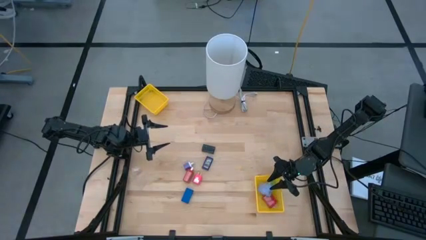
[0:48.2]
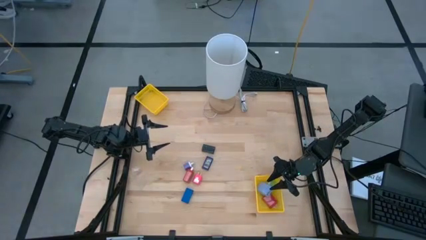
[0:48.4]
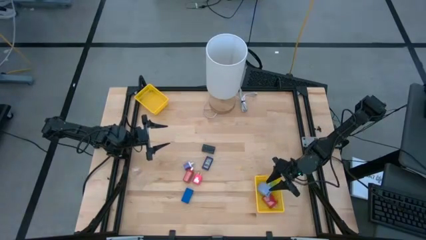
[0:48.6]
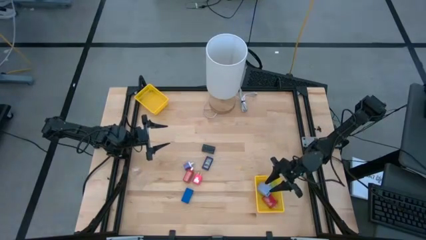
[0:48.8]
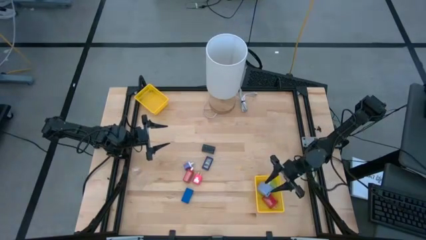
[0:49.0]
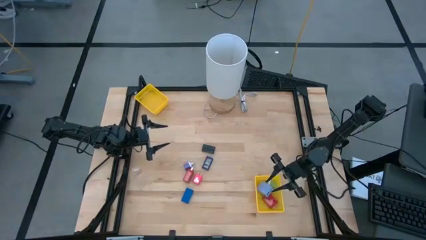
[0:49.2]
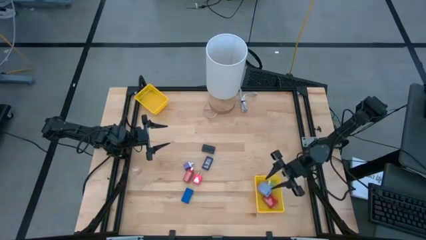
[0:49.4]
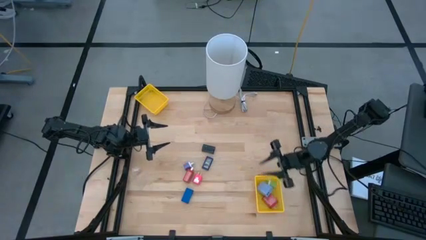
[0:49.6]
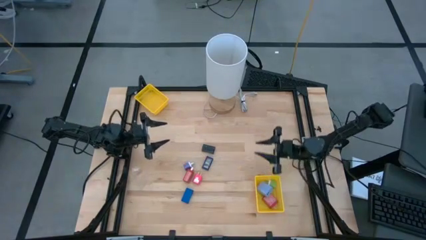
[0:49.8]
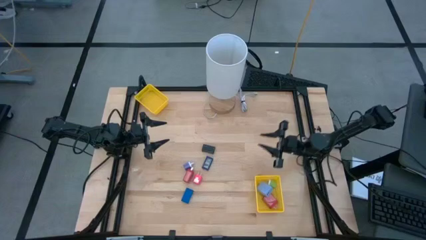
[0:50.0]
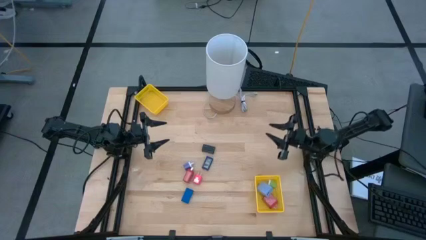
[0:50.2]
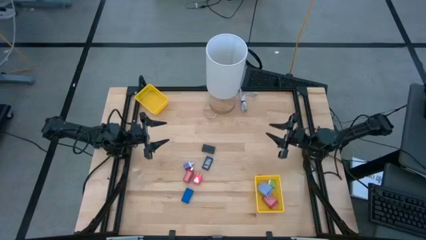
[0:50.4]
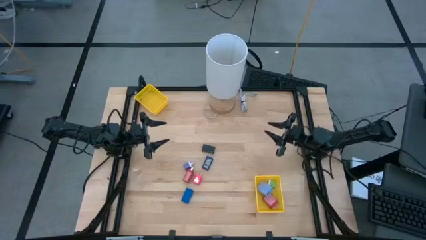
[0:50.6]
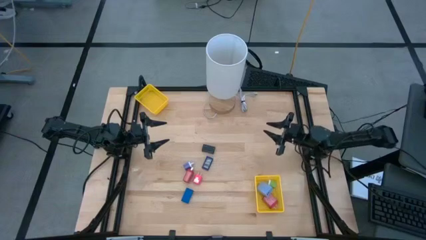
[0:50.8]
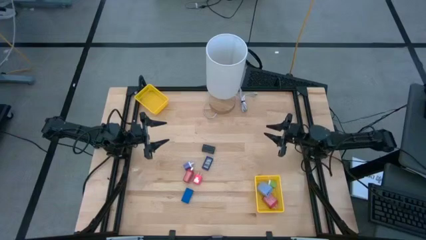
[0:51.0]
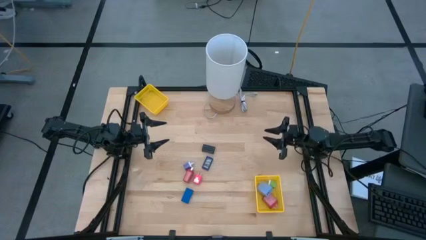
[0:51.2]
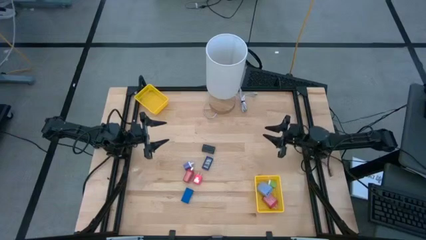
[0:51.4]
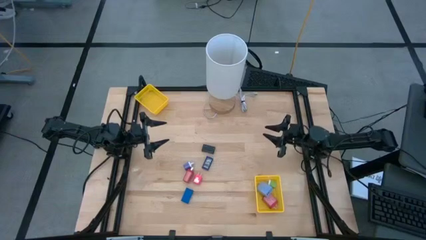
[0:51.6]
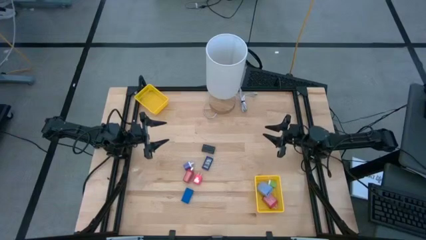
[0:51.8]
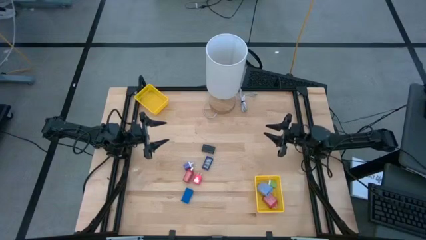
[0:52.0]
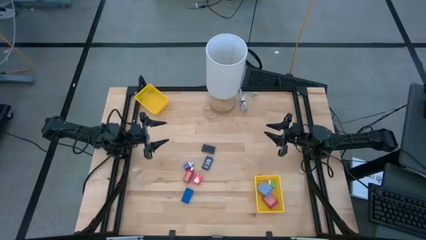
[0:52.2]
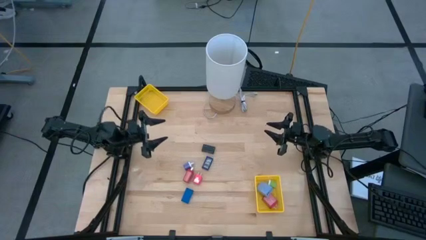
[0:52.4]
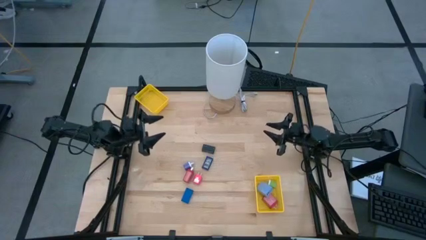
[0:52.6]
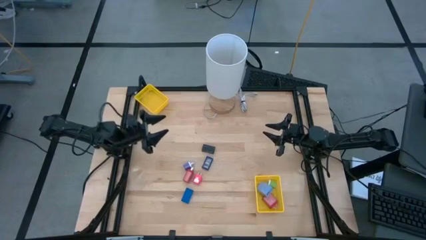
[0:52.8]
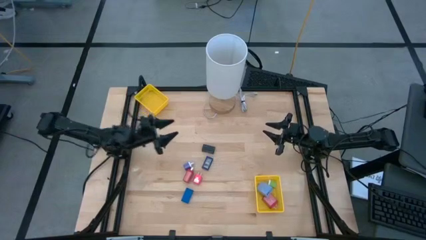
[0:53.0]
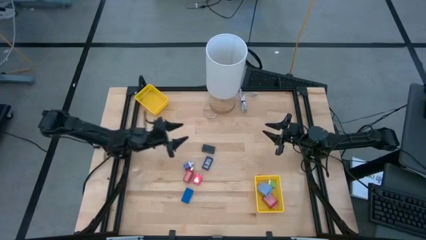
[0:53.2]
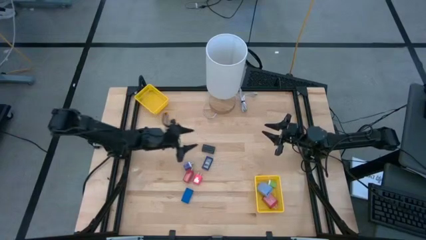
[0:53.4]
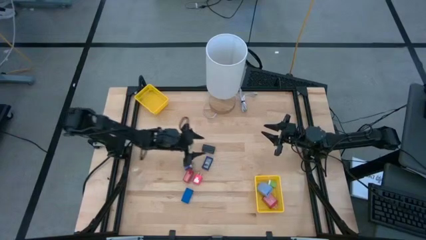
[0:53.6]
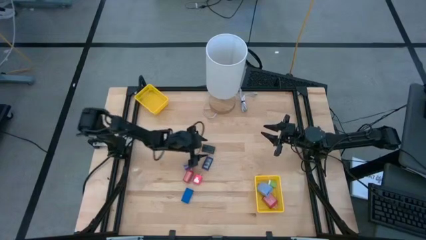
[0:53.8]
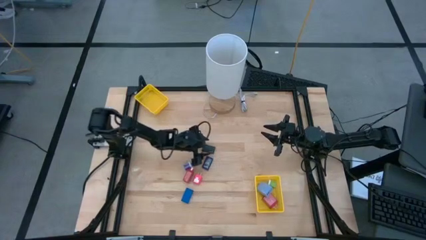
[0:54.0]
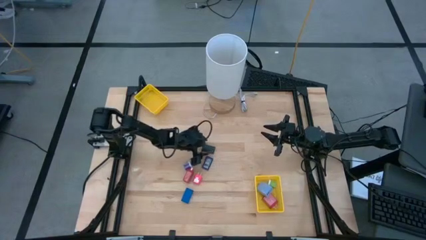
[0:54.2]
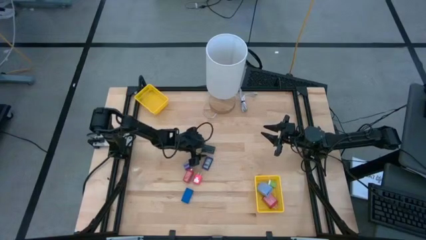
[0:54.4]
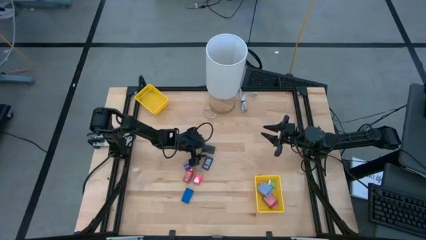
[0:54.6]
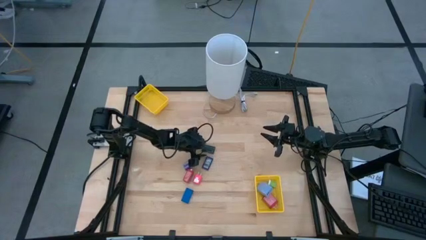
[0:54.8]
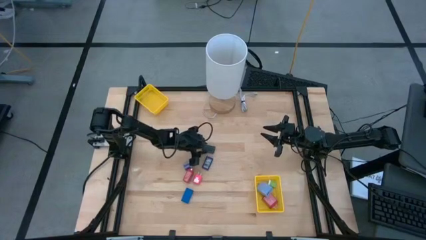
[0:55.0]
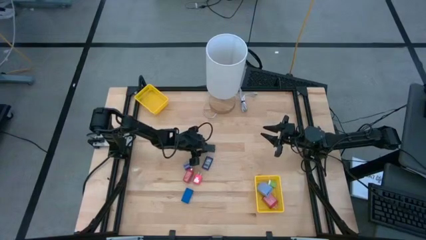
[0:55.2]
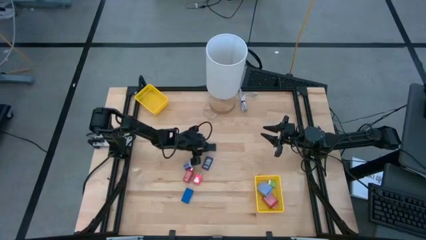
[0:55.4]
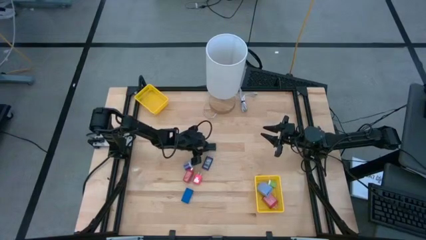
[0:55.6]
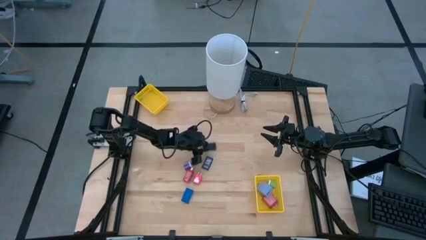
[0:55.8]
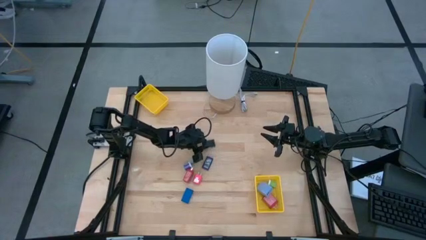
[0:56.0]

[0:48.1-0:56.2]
Task: Pick & Place Office items
Put the black digital timer into the top yellow bin

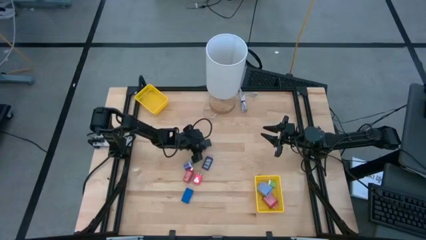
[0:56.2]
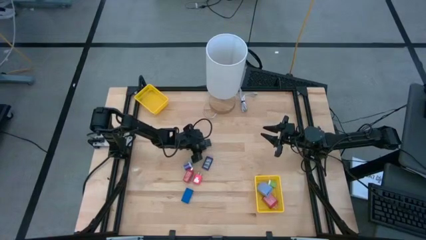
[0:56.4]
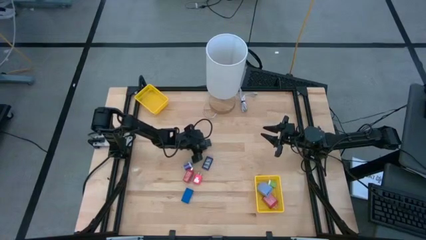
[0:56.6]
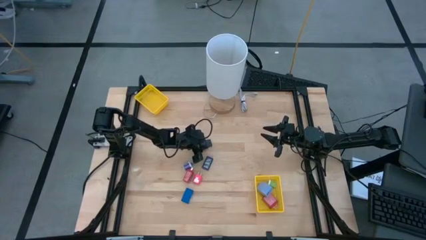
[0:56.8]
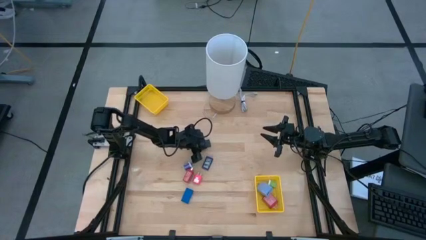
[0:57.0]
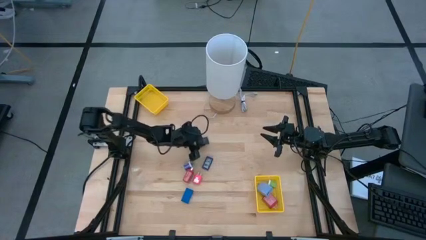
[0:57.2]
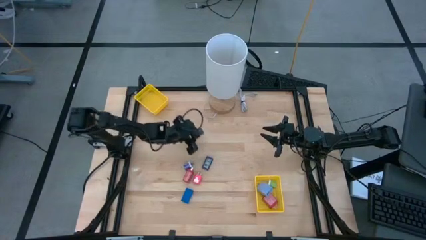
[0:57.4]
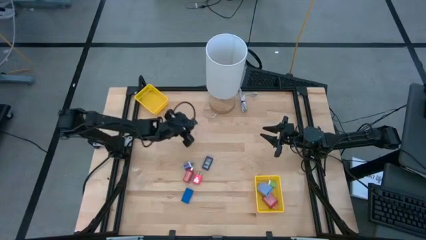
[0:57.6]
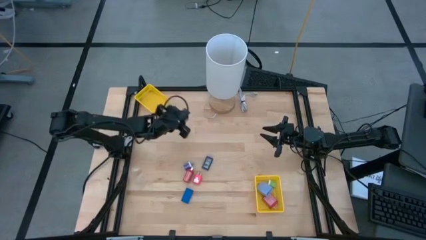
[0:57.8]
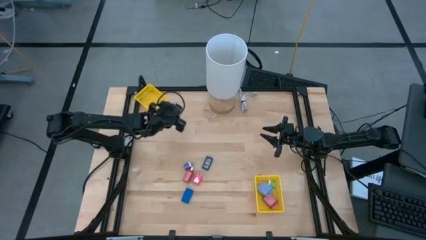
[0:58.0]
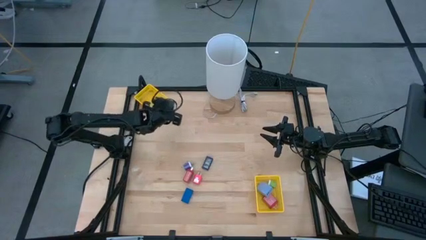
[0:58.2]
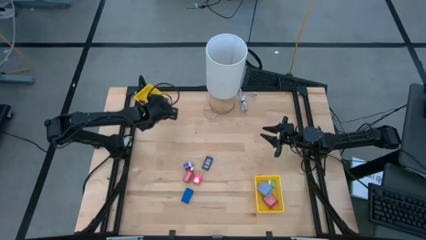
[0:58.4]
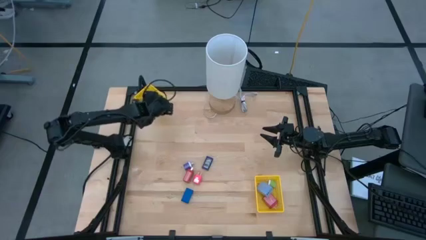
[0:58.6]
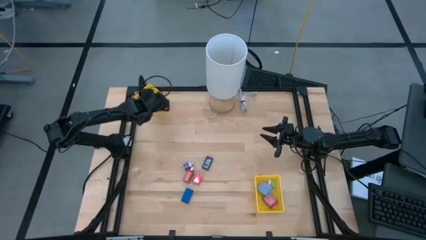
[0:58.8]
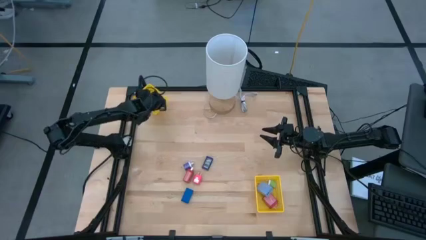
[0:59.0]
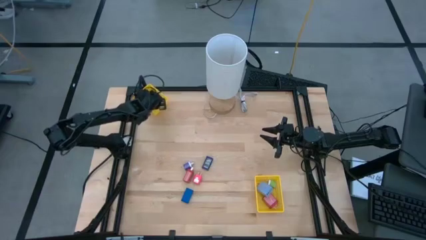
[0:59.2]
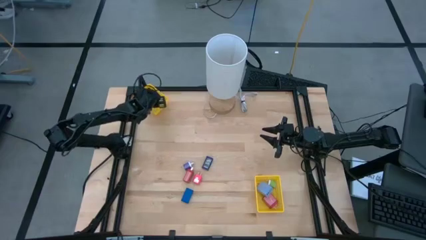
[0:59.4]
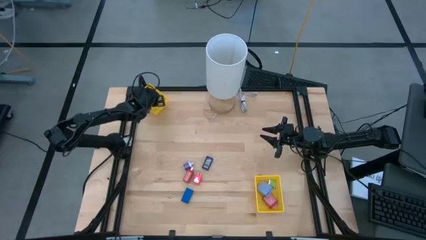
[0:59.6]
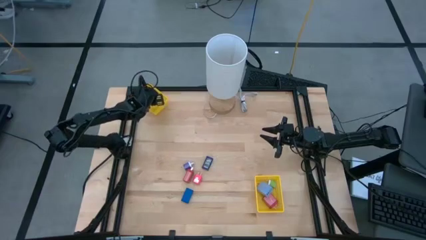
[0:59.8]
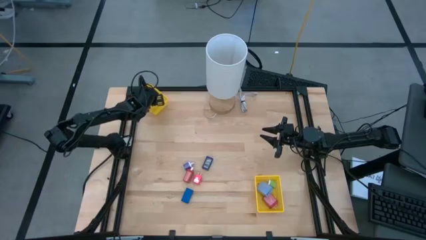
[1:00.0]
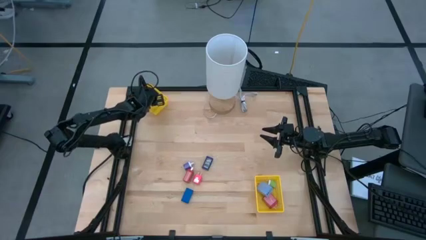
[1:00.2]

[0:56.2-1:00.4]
Put the black digital timer into the top yellow bin
